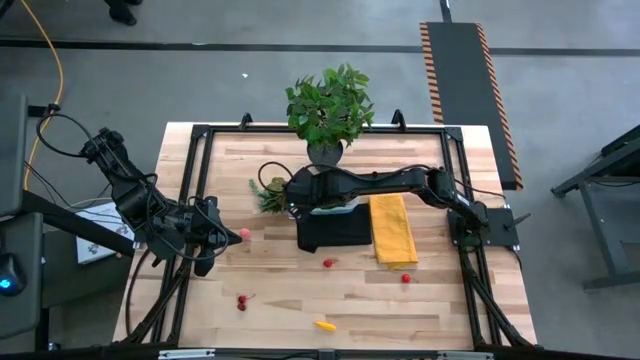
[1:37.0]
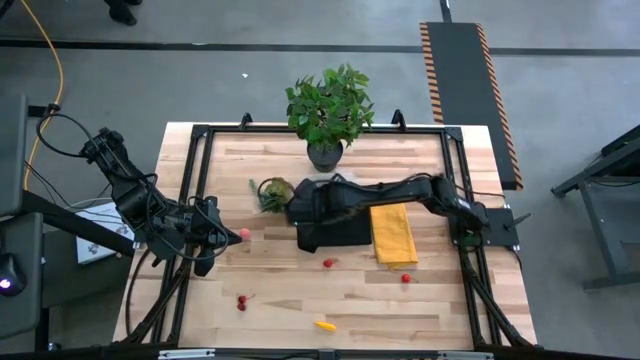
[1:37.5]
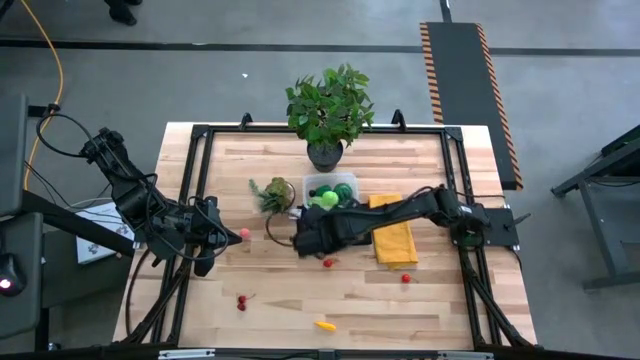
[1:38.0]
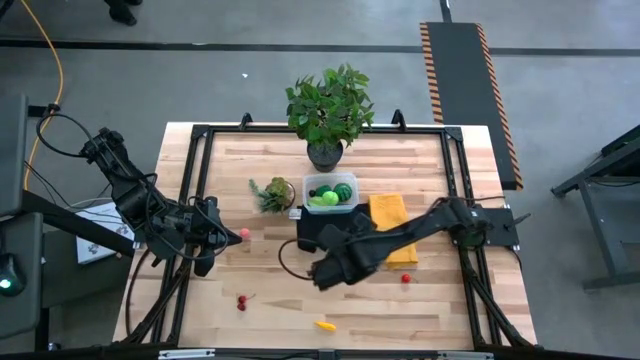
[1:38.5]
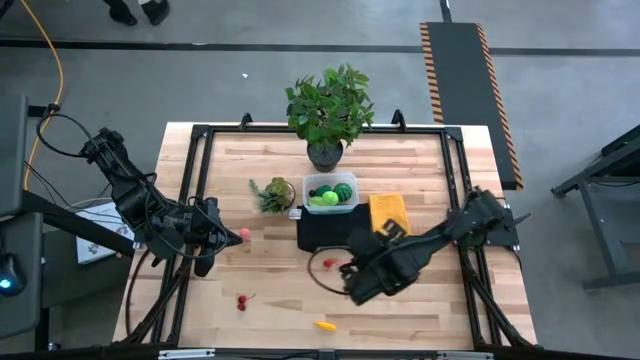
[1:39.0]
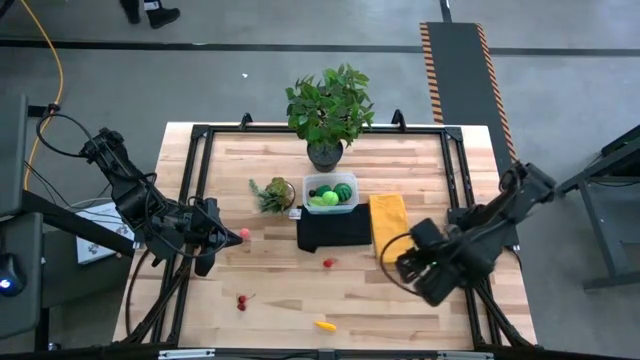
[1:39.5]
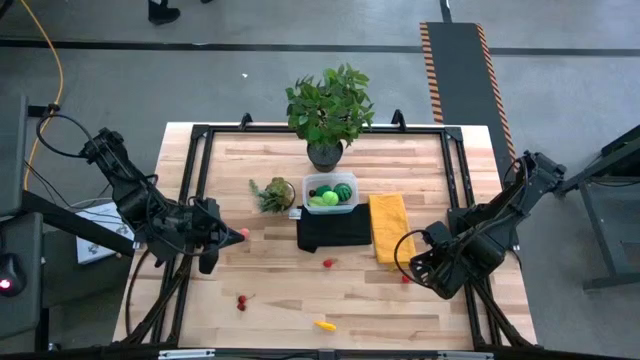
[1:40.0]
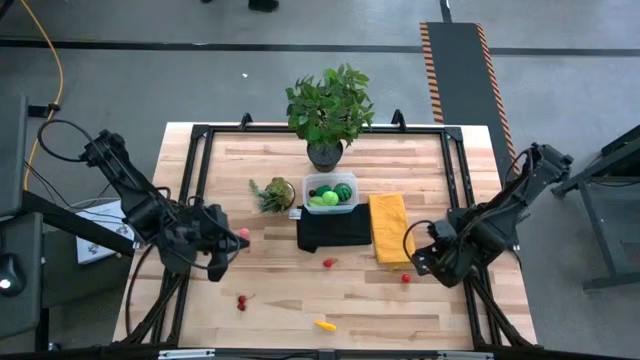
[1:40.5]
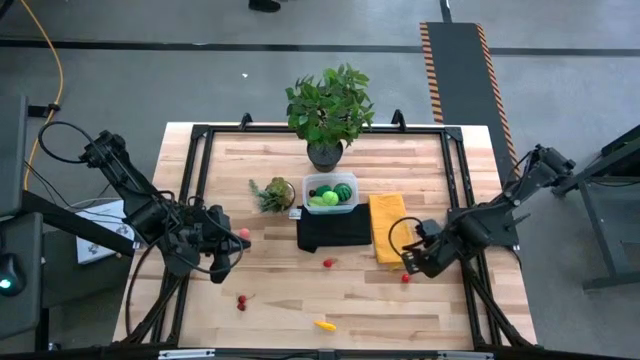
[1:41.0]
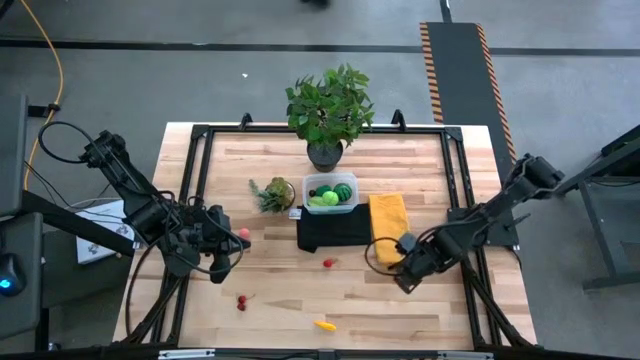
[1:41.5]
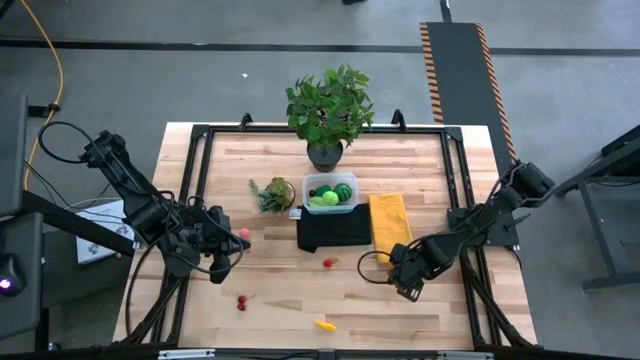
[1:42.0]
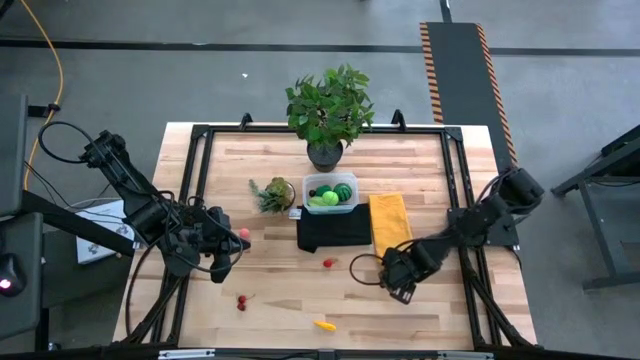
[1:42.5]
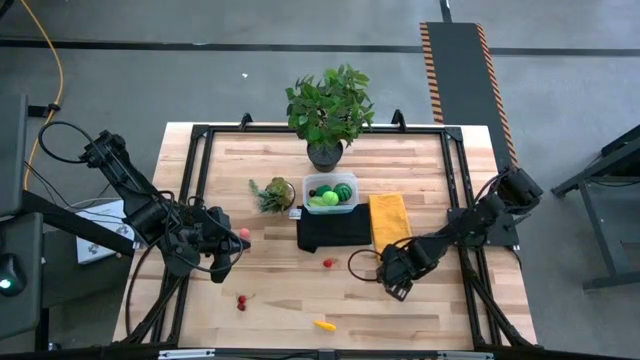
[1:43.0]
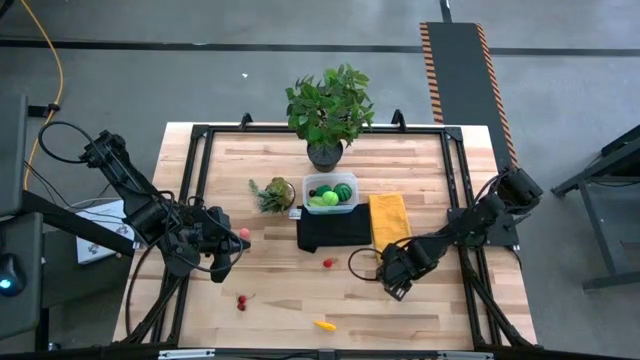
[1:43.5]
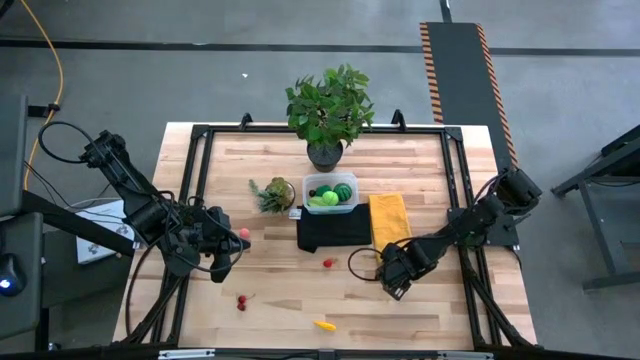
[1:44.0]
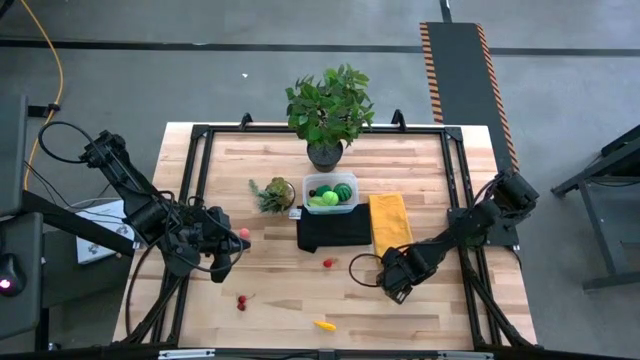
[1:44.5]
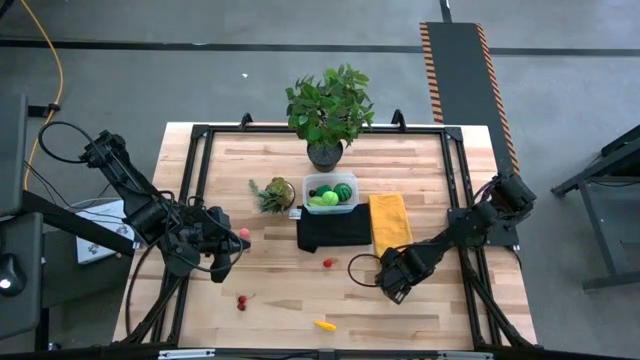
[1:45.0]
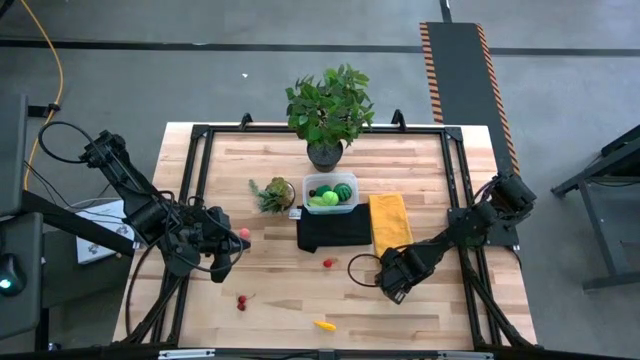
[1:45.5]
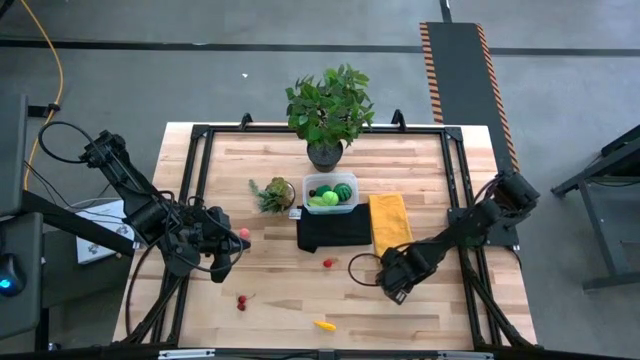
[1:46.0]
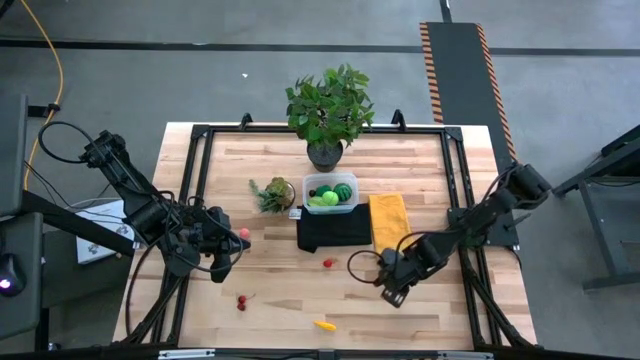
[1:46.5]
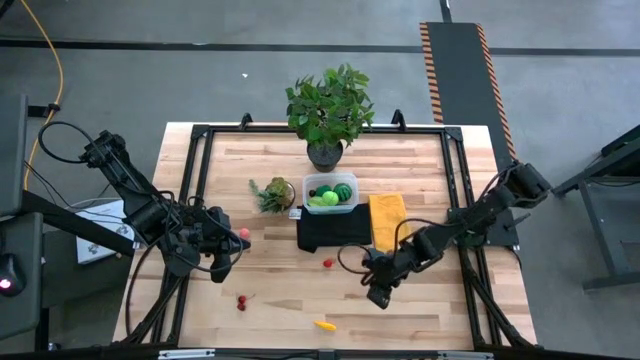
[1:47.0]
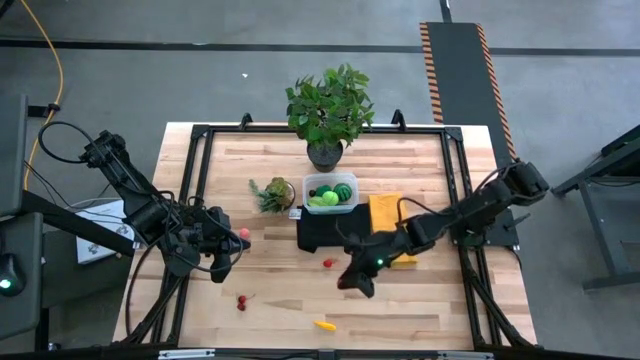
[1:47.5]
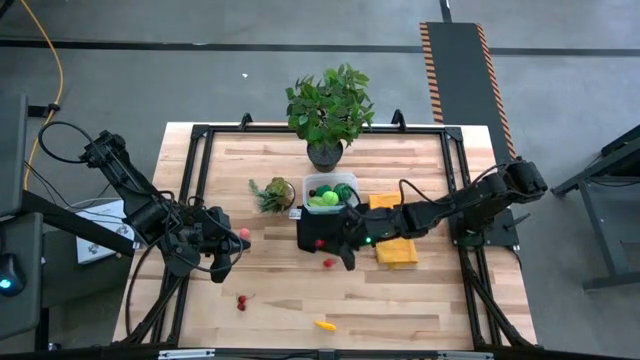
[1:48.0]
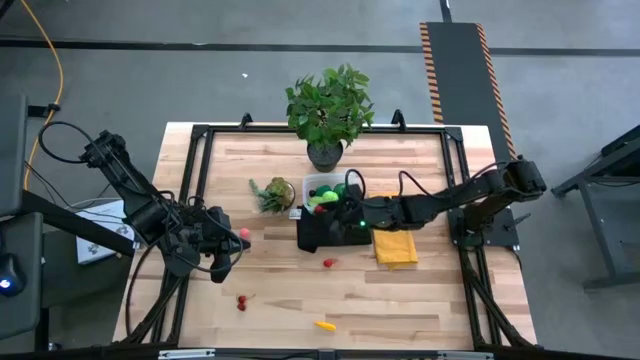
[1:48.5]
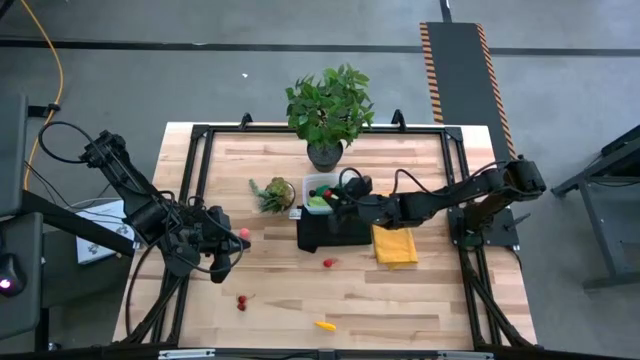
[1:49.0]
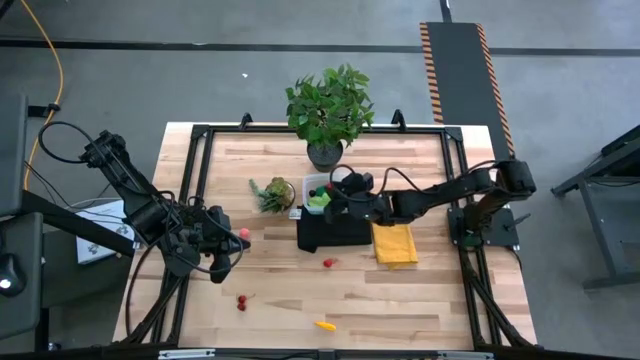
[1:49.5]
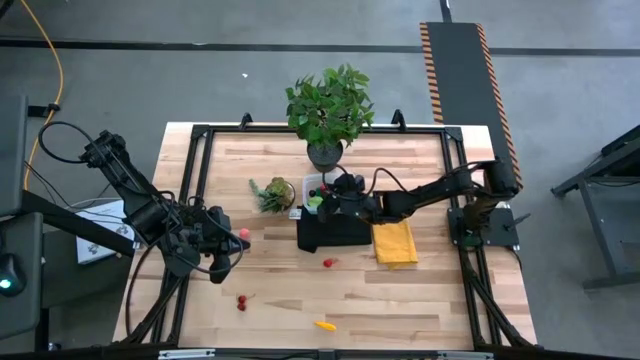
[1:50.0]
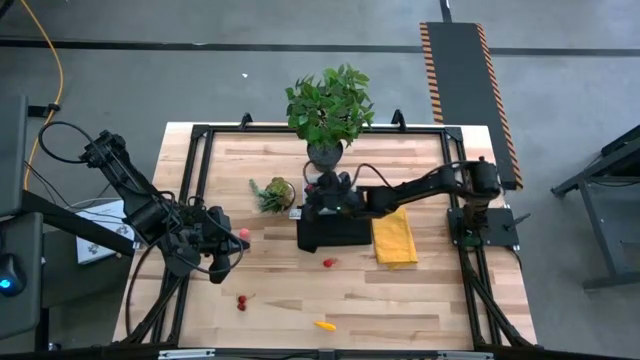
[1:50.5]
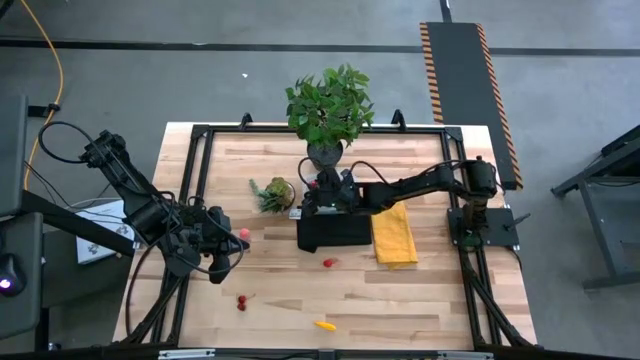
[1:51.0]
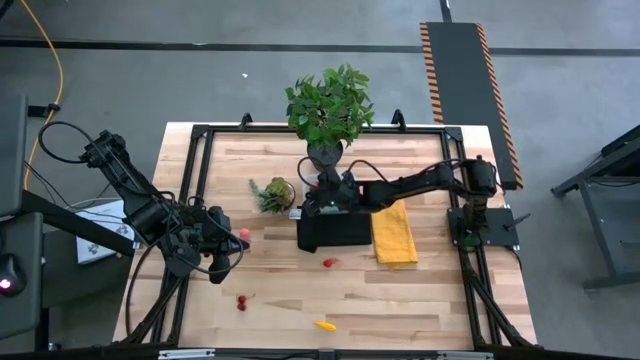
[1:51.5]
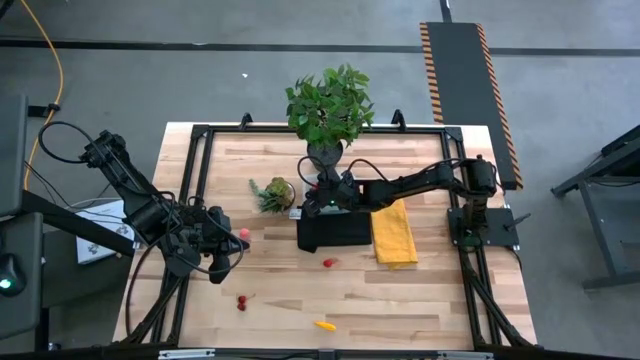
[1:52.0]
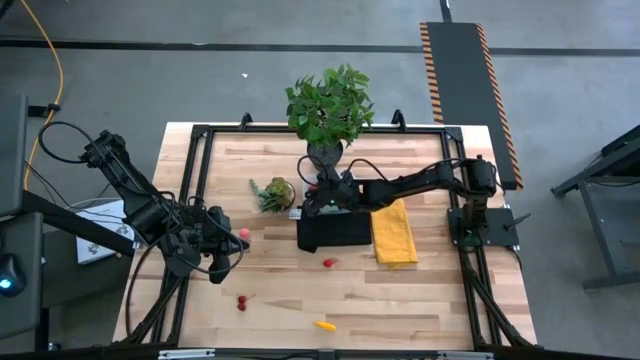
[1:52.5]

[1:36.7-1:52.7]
Task: Pick and placing Produce into tupperware
Put the red cherry into the transparent bin

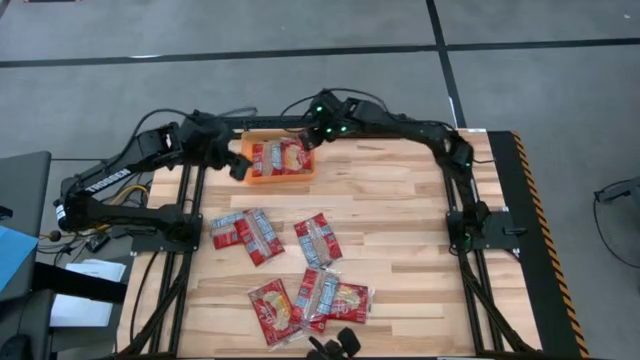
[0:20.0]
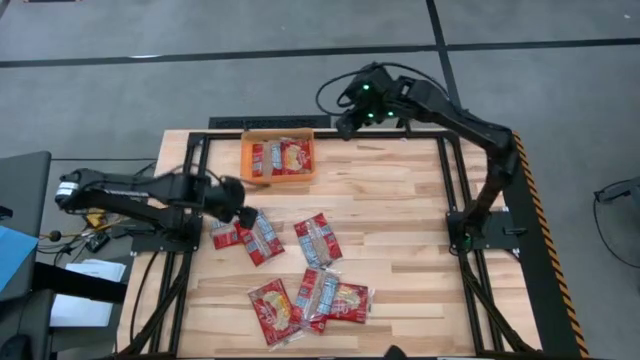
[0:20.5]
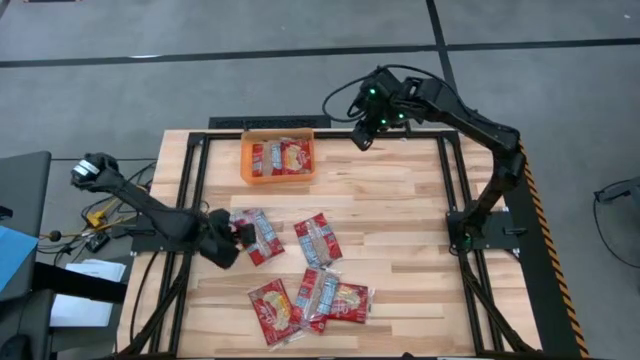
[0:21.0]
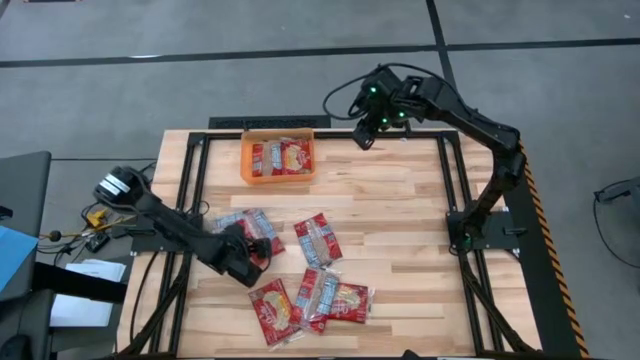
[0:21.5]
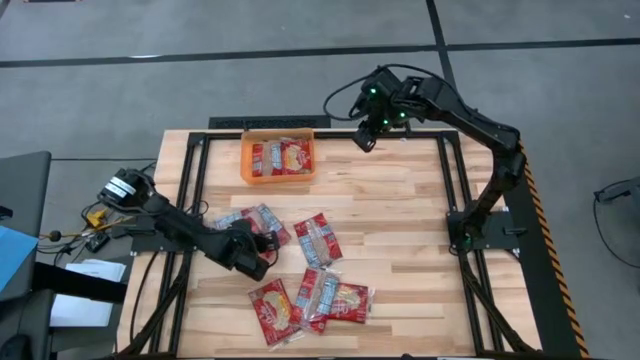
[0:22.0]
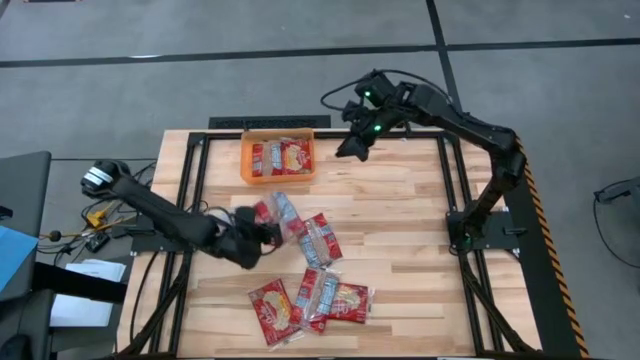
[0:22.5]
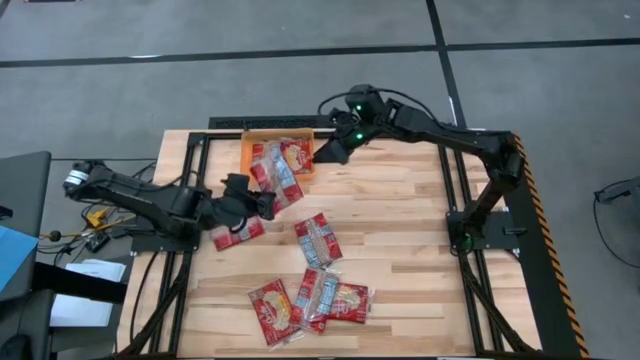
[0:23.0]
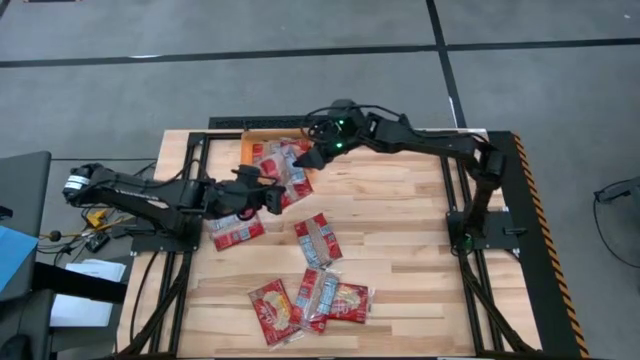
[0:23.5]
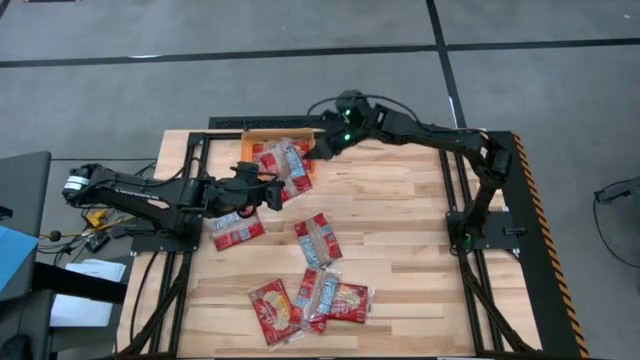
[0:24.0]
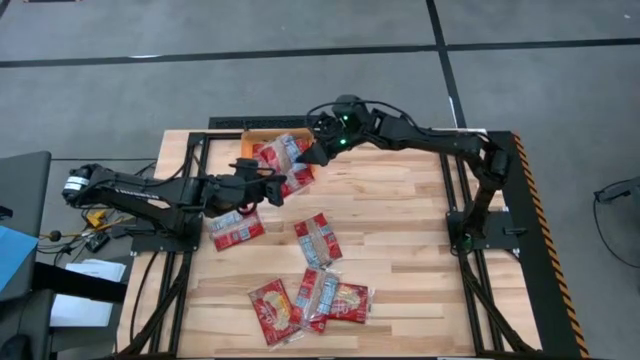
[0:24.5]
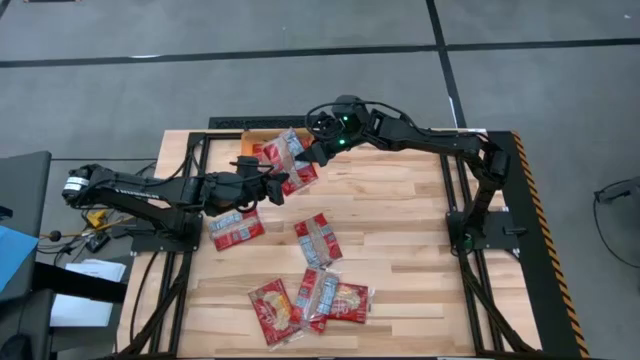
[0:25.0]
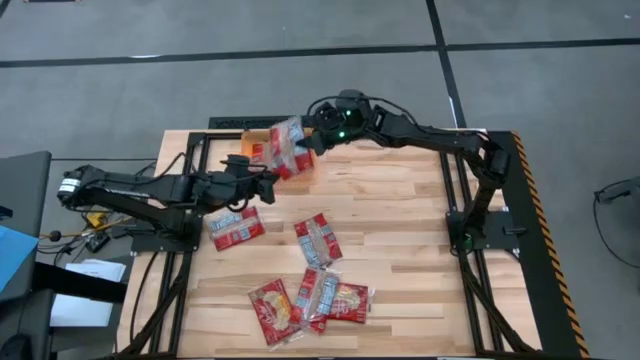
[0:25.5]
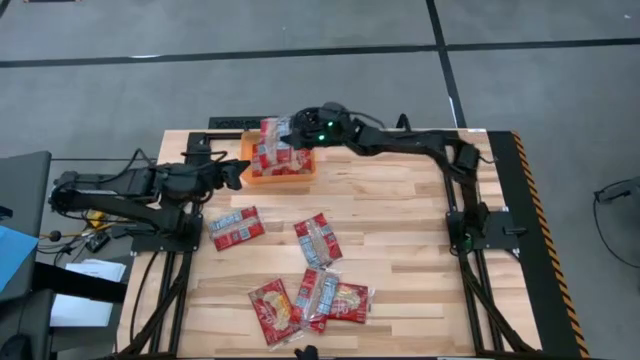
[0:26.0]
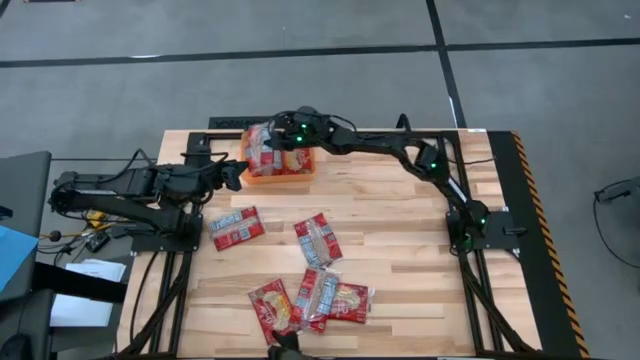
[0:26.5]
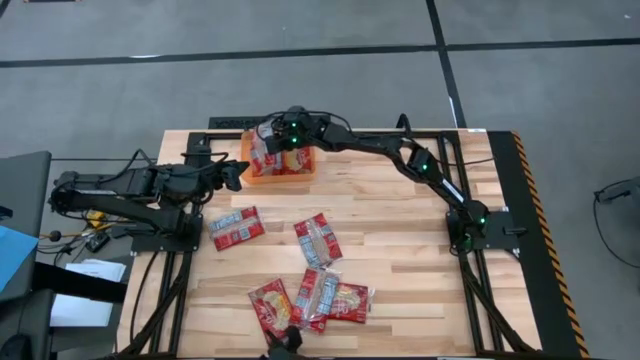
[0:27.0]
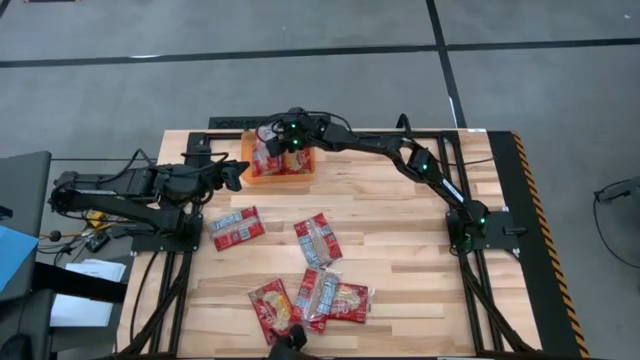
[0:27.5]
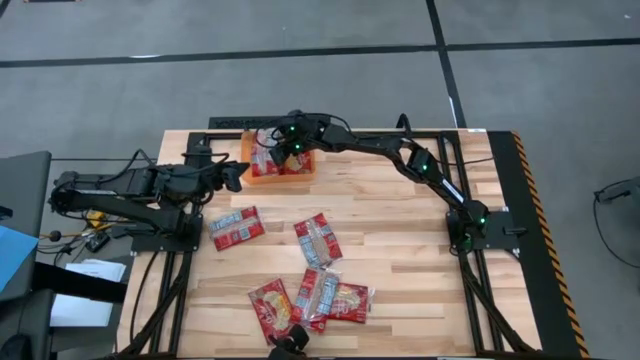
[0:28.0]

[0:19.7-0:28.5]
Task: Sort popcorn bags into baskets
Put the popcorn bag into the orange bin
